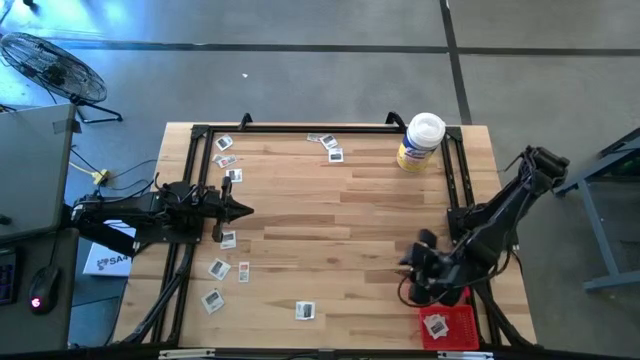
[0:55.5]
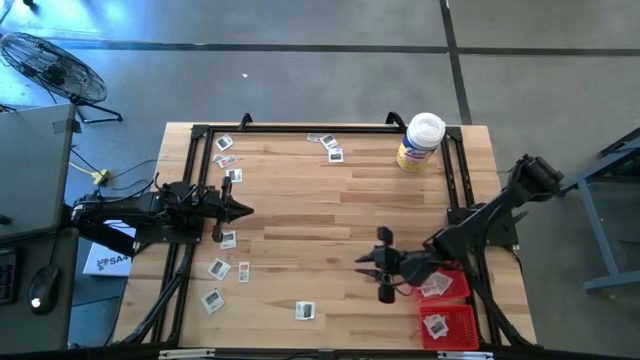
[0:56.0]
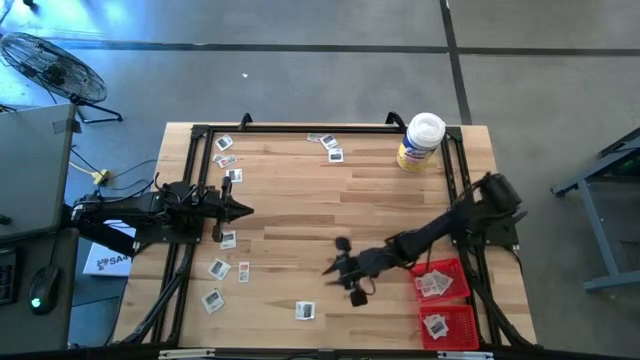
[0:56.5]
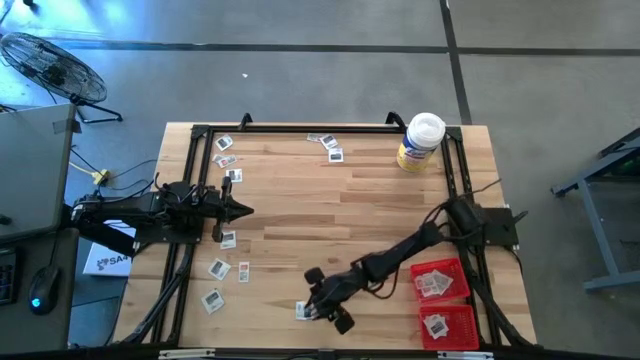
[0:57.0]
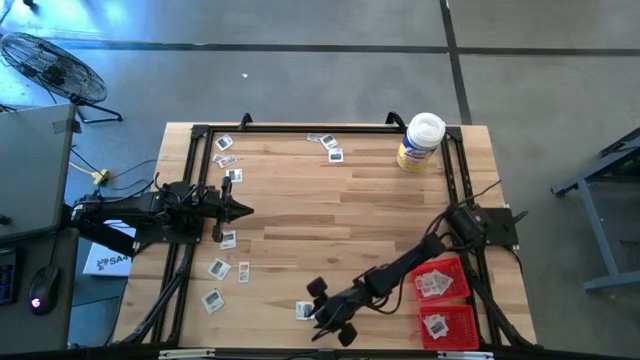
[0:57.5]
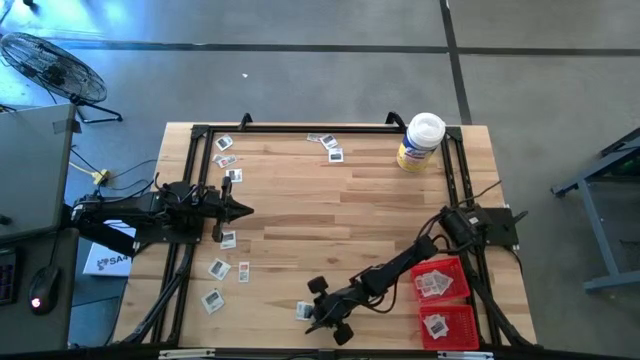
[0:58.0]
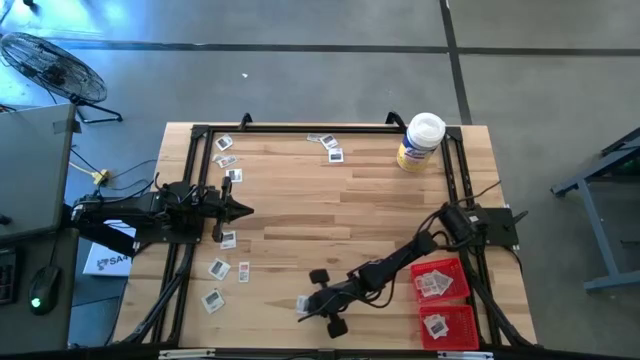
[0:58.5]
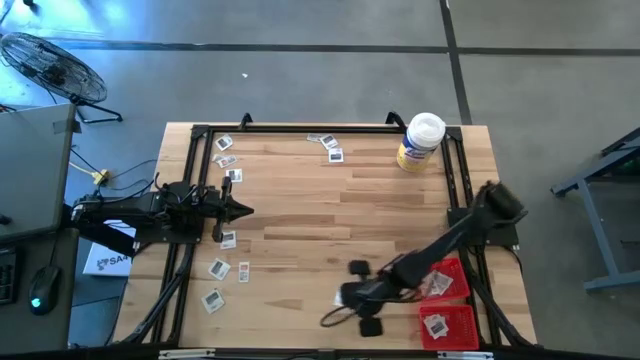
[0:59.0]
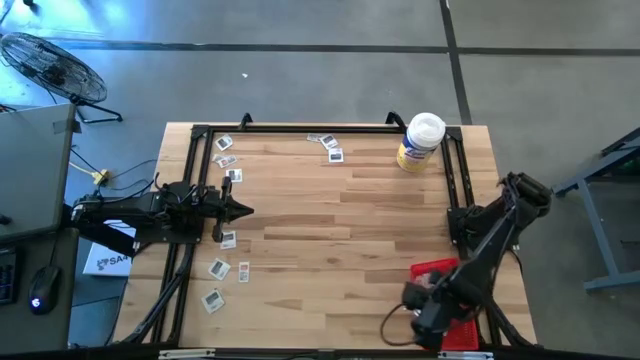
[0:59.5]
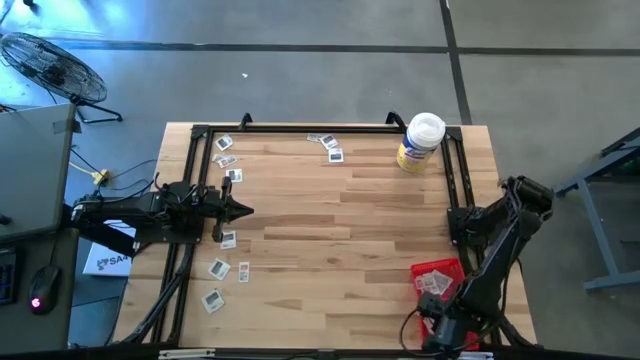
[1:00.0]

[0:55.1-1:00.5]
Task: Pick & Place First Aid Supplies
Put the white towelette pack into the bottom red bin

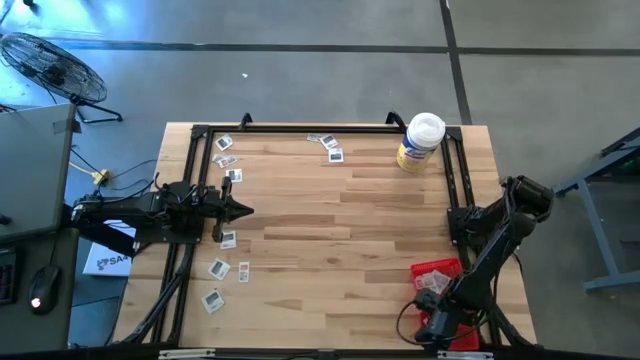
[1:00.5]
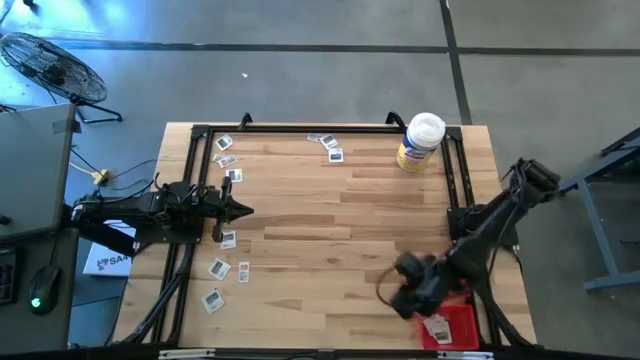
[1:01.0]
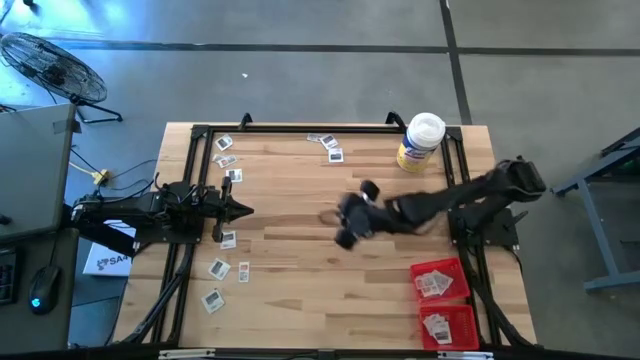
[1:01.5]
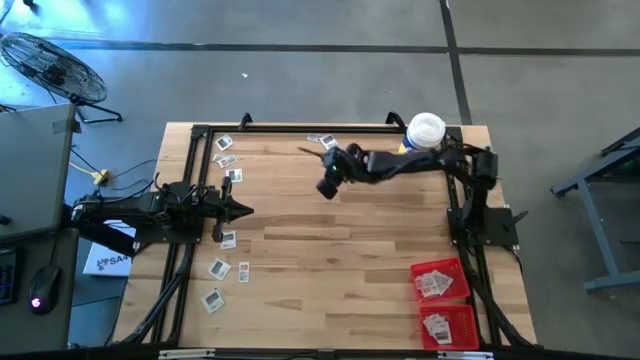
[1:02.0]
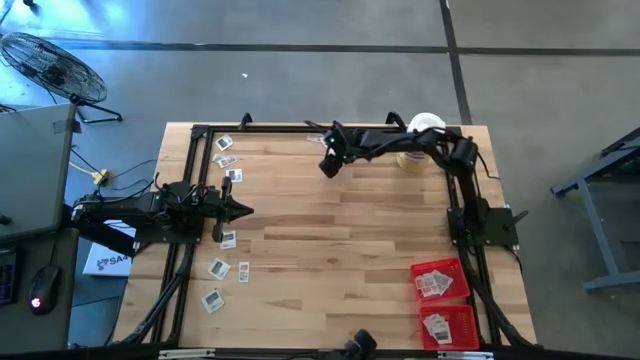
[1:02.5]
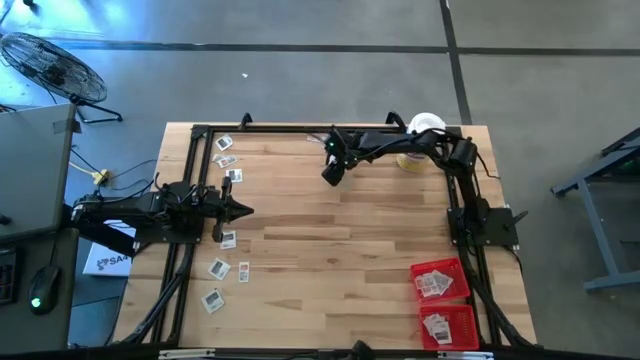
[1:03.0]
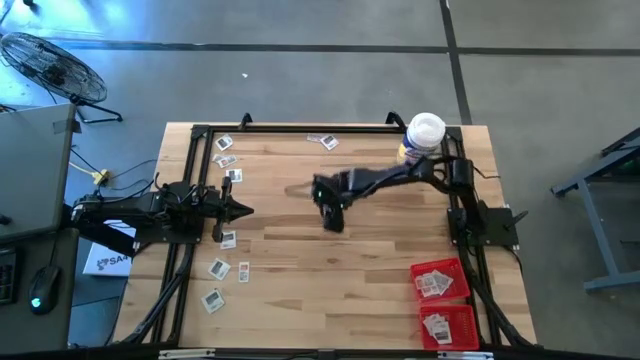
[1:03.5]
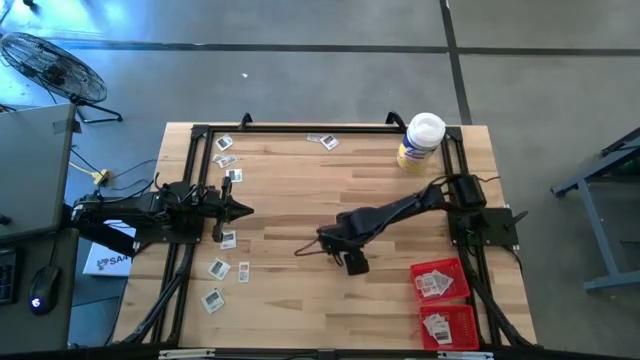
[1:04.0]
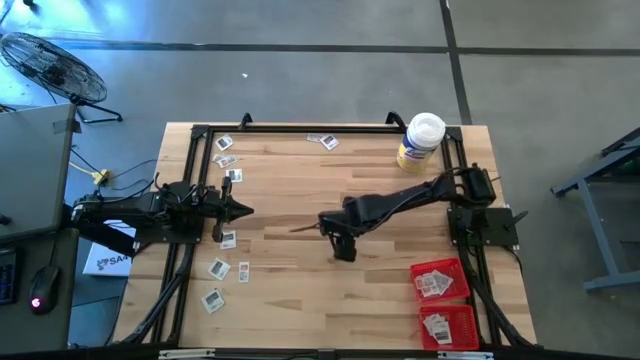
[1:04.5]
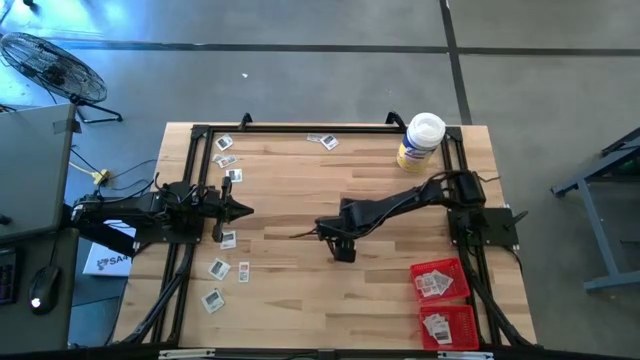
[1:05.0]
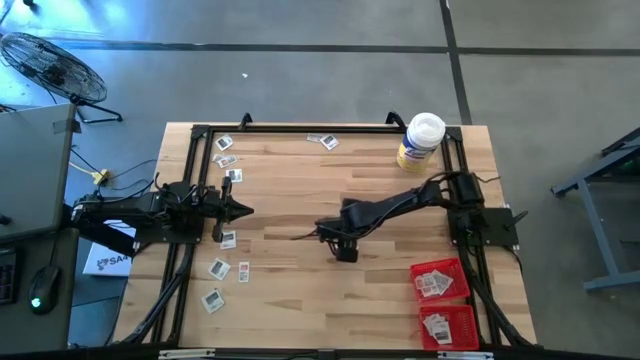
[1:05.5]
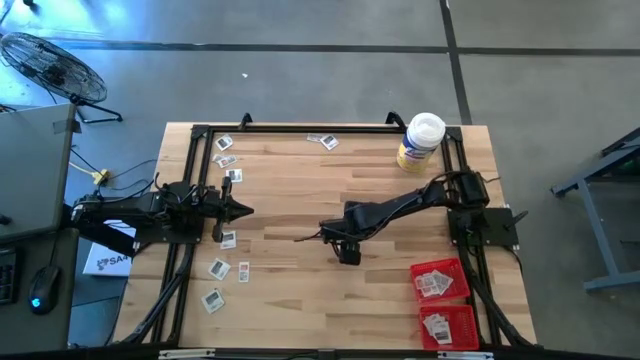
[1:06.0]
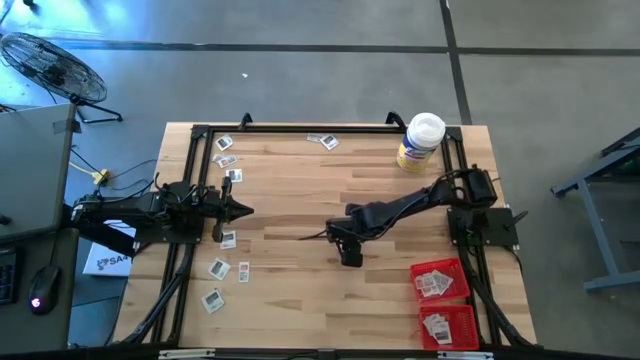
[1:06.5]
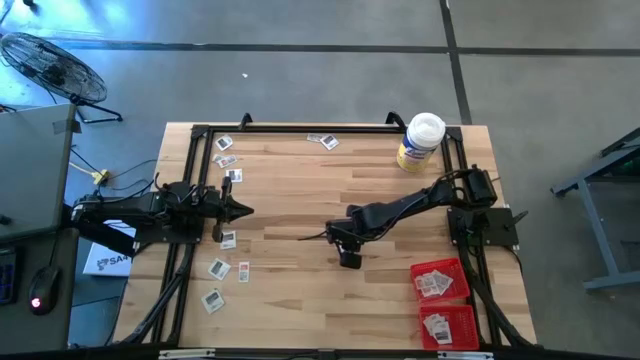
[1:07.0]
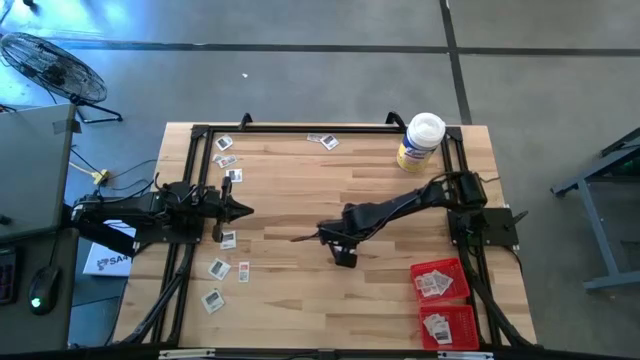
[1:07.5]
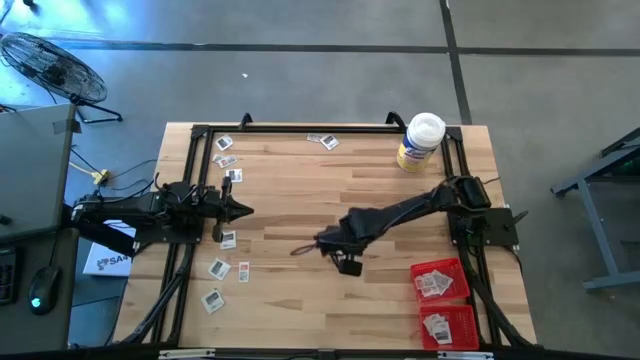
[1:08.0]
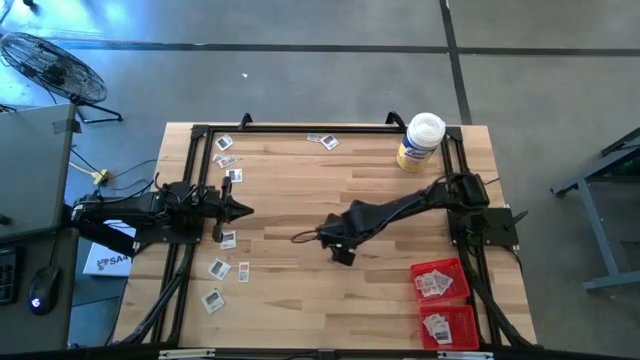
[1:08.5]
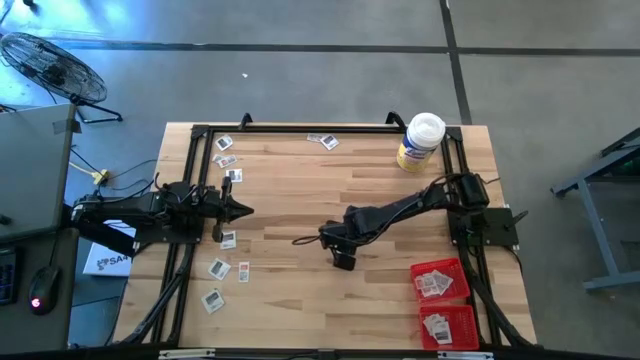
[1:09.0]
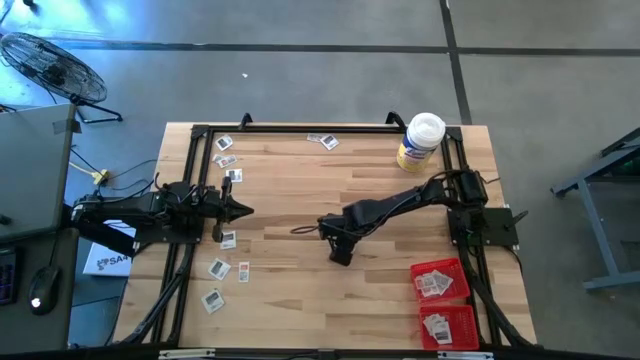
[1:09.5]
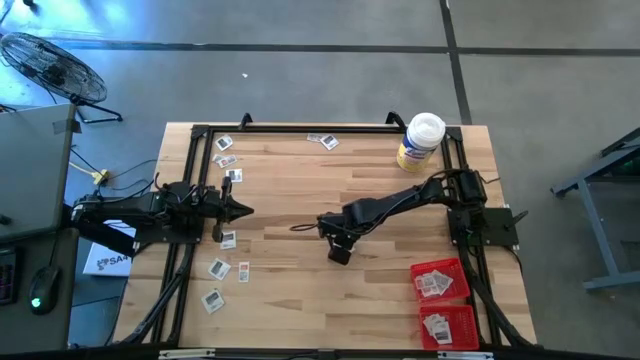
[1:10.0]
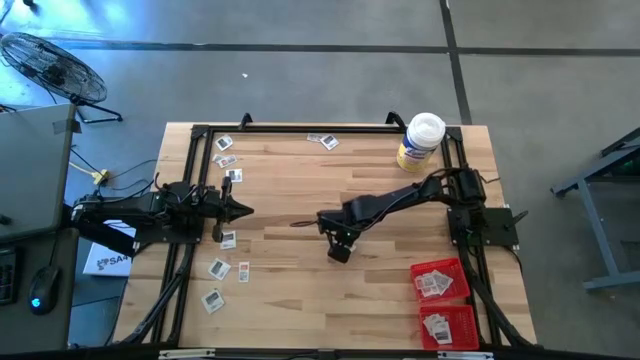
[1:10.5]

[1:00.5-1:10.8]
Put the white towelette pack into the bottom red bin

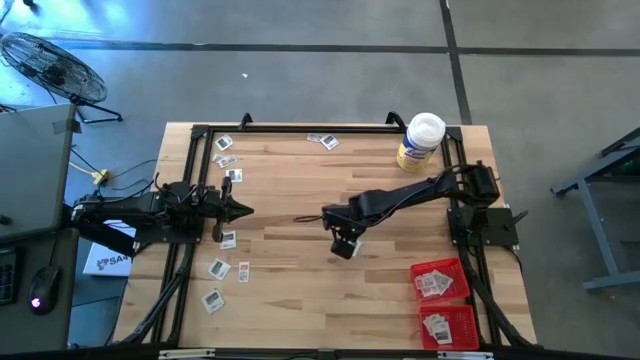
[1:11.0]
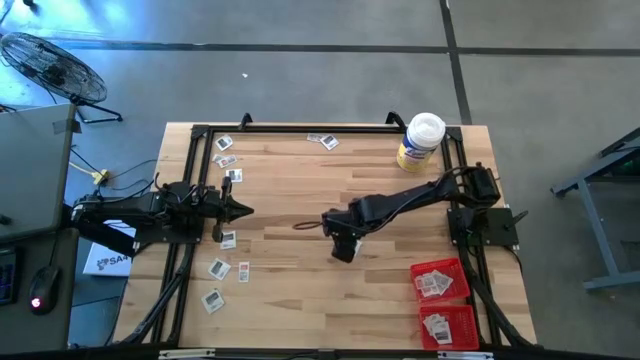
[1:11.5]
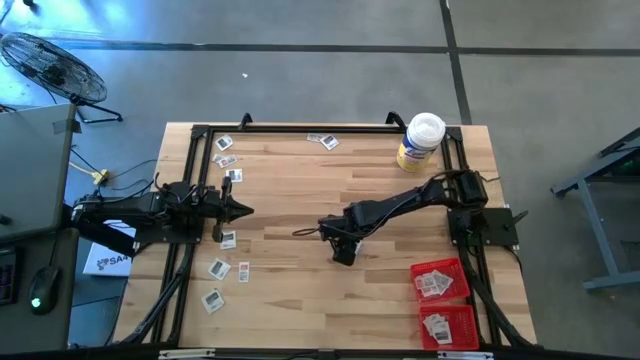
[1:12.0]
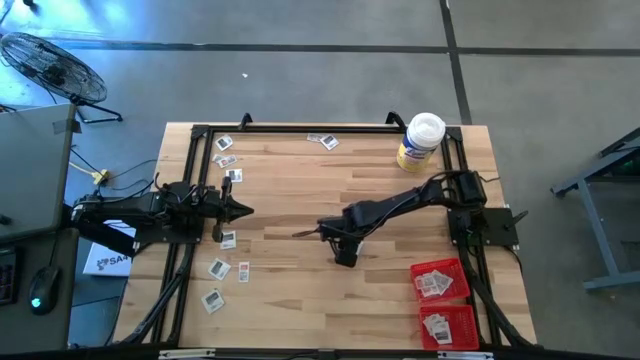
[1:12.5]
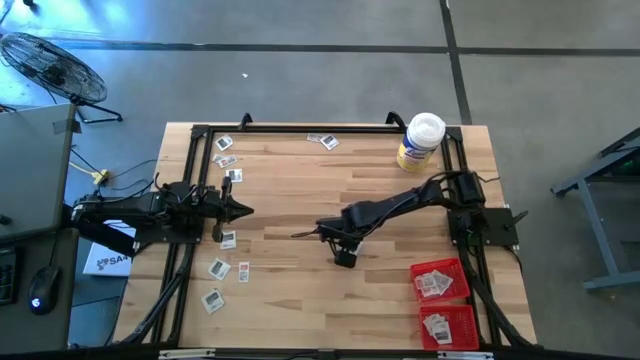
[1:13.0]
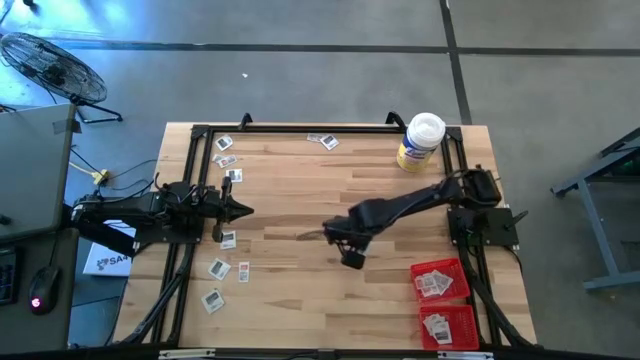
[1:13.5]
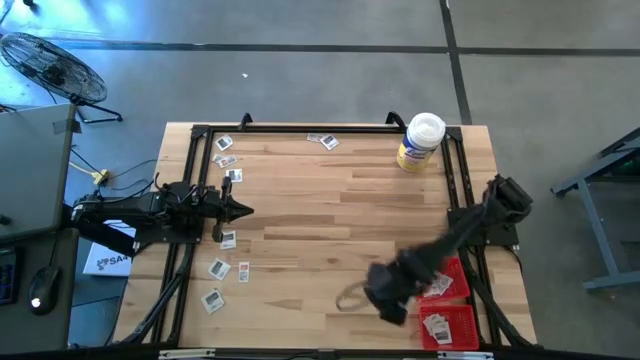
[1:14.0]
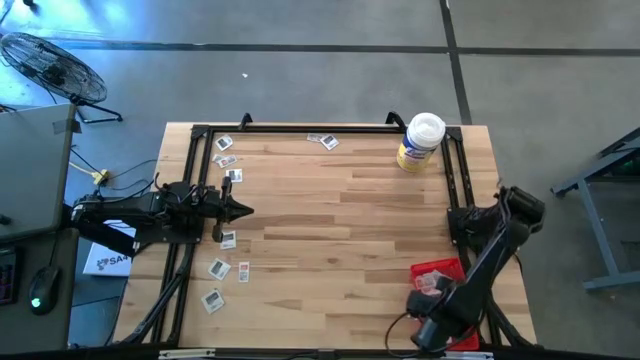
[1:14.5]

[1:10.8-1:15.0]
Put the white towelette pack into the bottom red bin

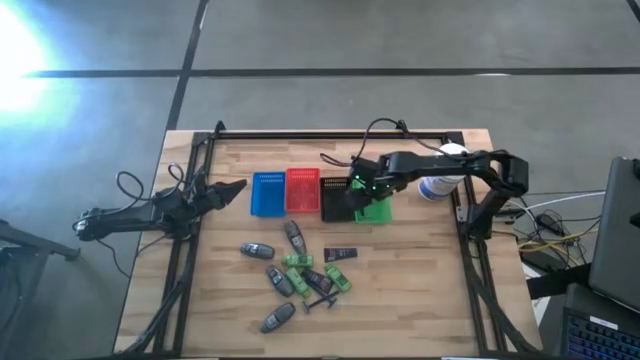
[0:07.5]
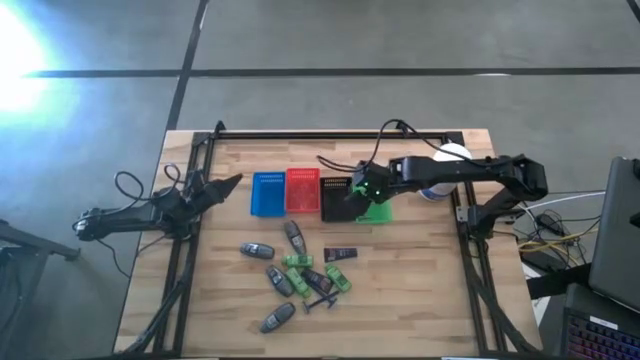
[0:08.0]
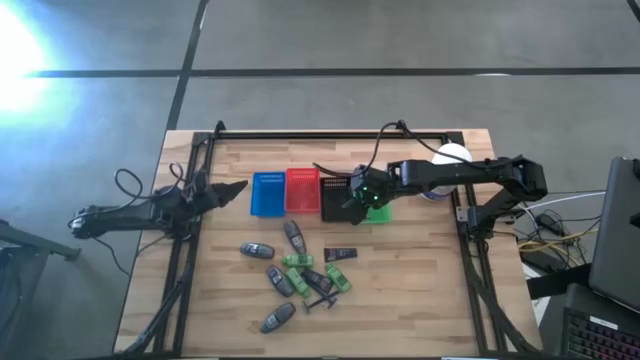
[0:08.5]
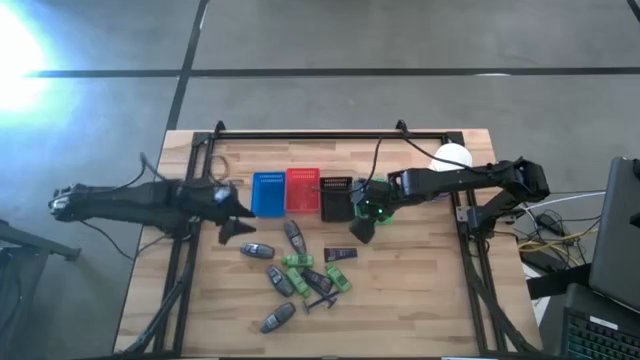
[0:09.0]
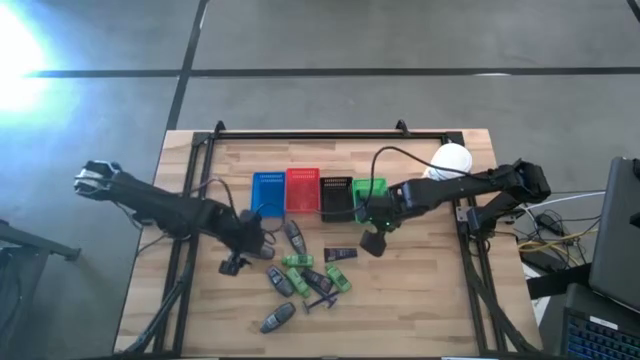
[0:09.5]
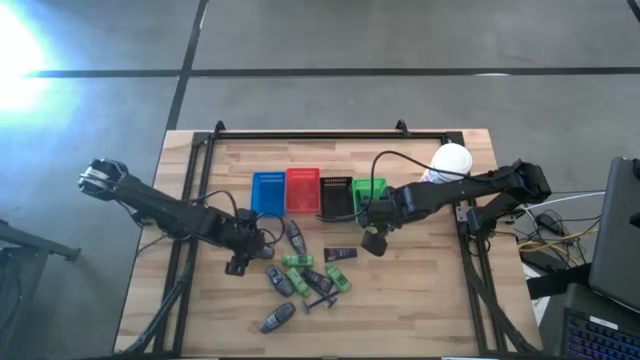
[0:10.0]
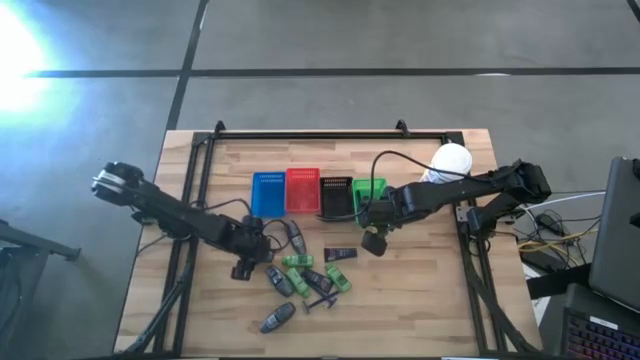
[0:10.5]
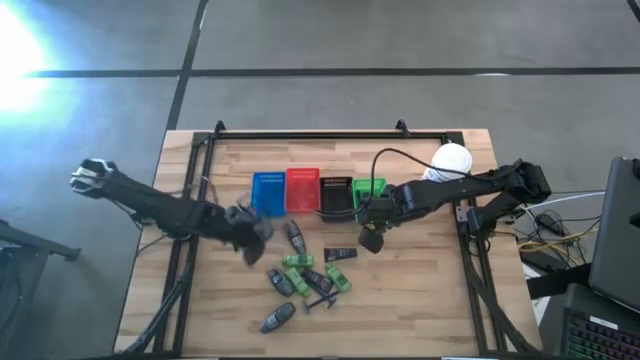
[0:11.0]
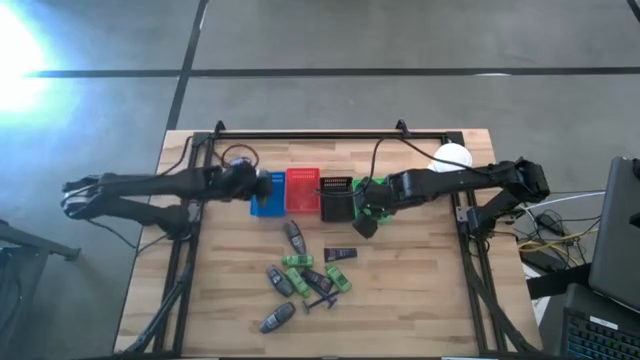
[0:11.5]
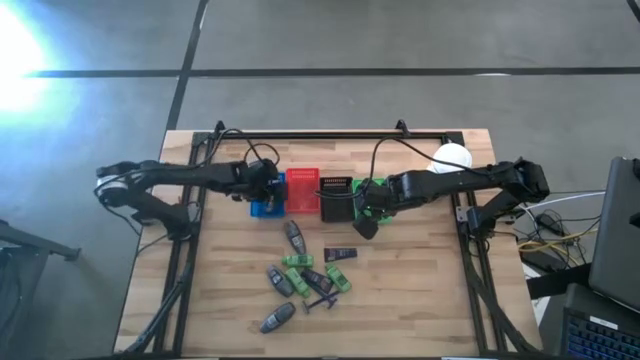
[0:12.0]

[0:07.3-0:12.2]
Task: Pick & Place Travel size toiletries
Put the gray deodorant into the blue bin
